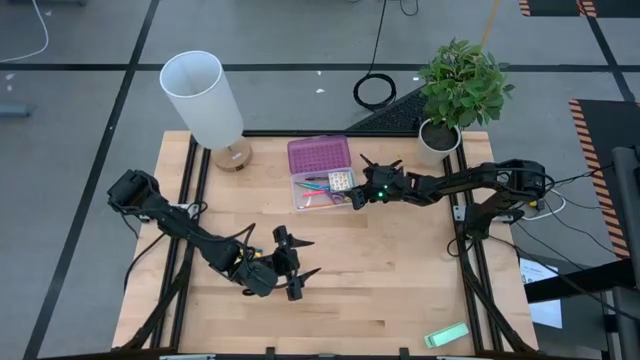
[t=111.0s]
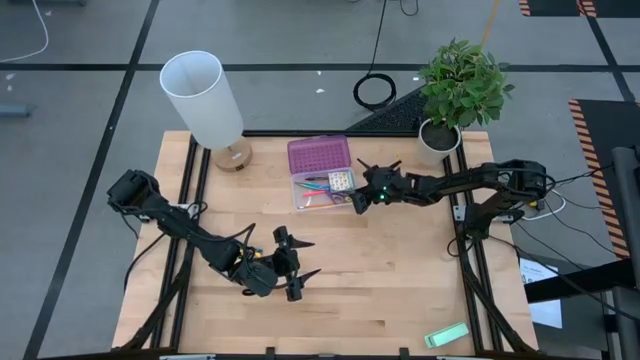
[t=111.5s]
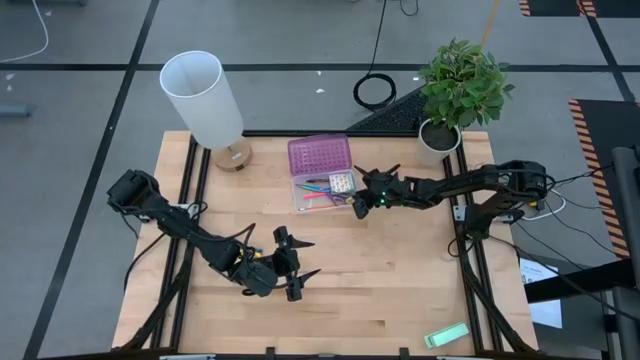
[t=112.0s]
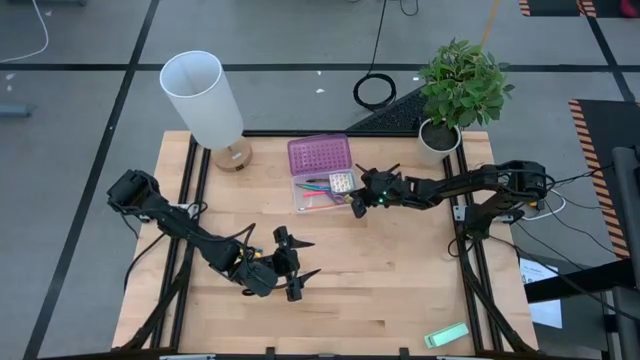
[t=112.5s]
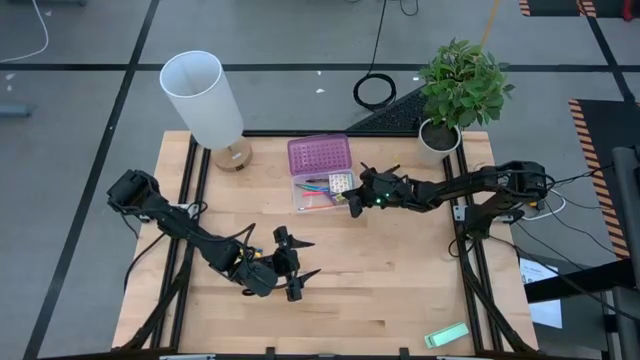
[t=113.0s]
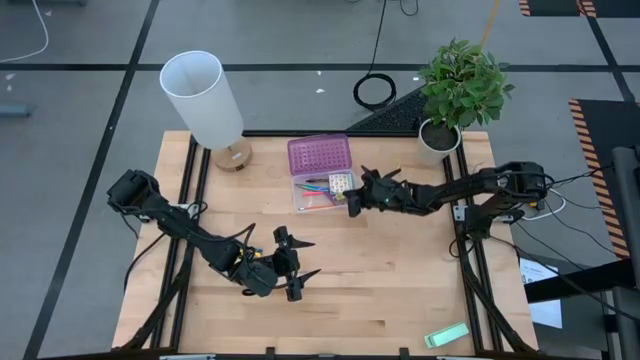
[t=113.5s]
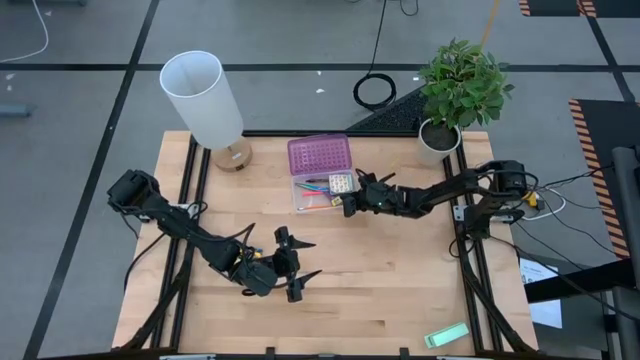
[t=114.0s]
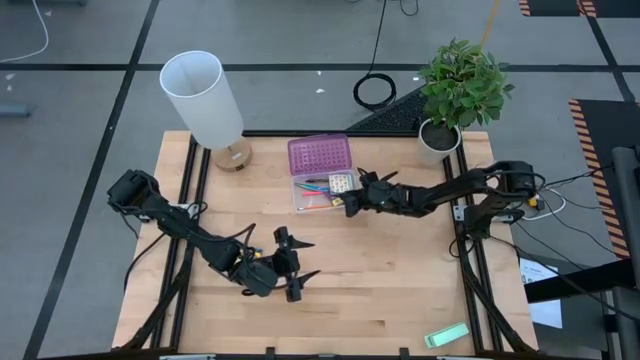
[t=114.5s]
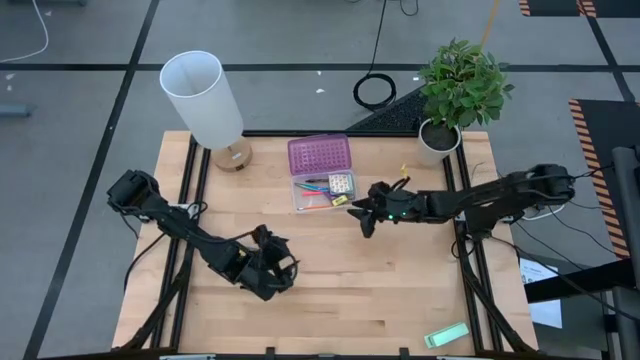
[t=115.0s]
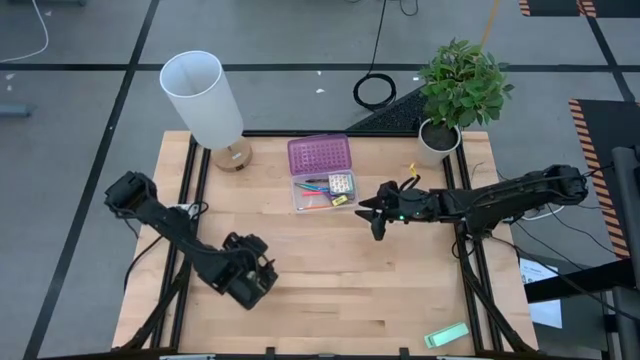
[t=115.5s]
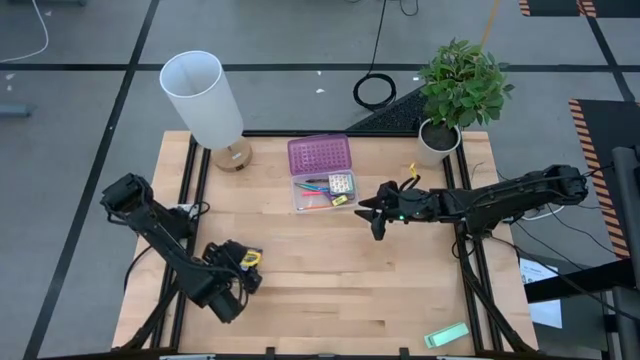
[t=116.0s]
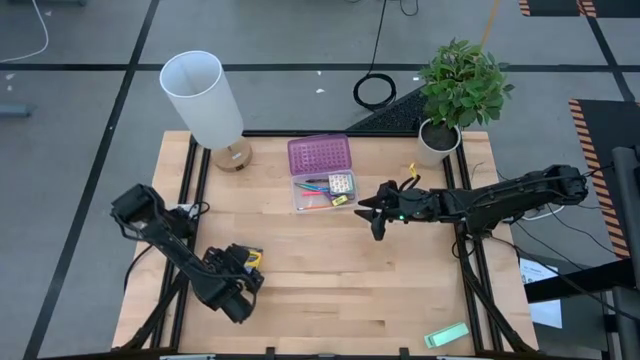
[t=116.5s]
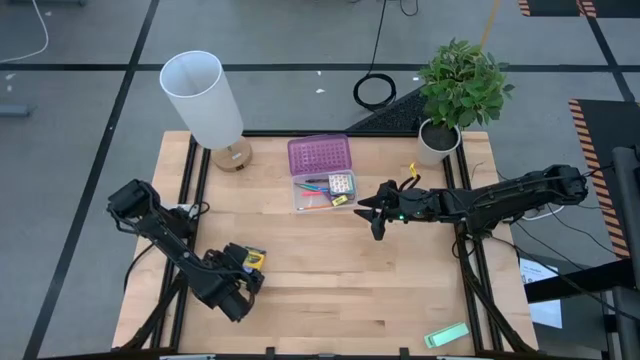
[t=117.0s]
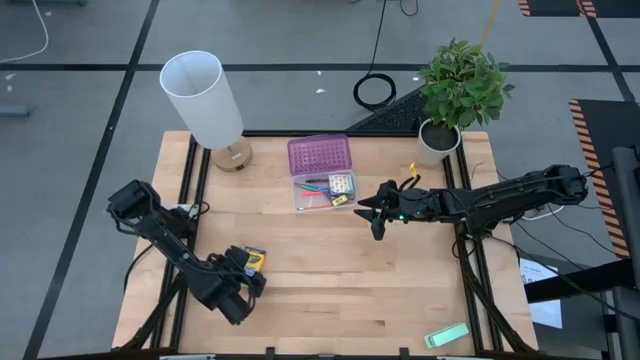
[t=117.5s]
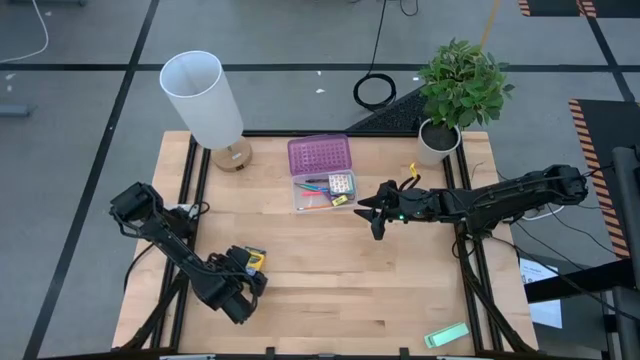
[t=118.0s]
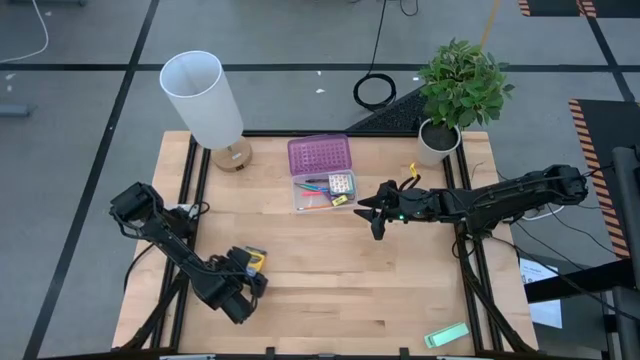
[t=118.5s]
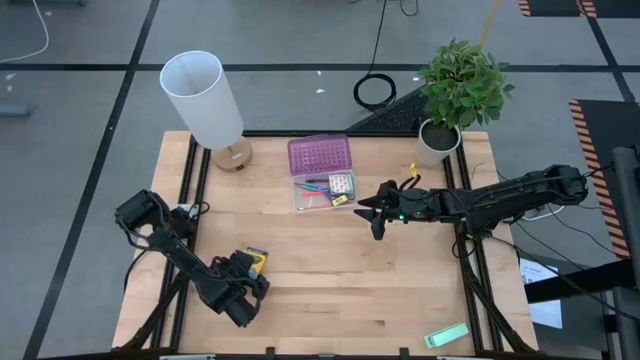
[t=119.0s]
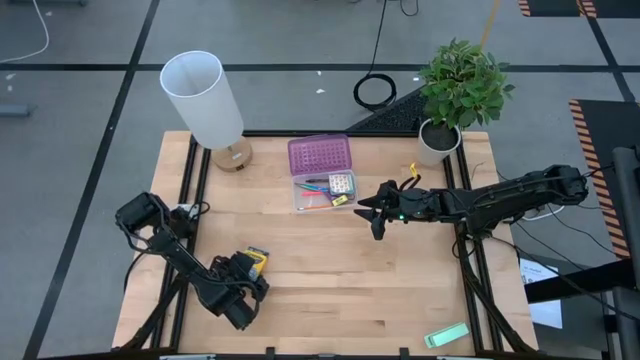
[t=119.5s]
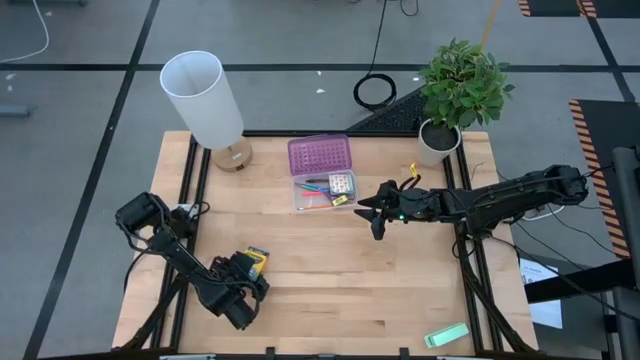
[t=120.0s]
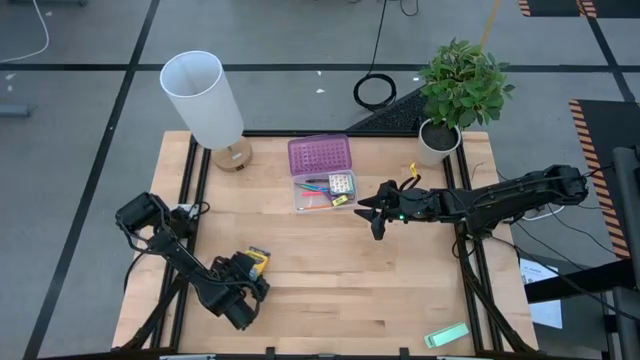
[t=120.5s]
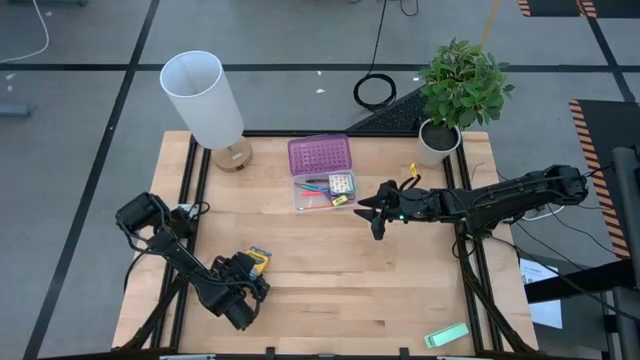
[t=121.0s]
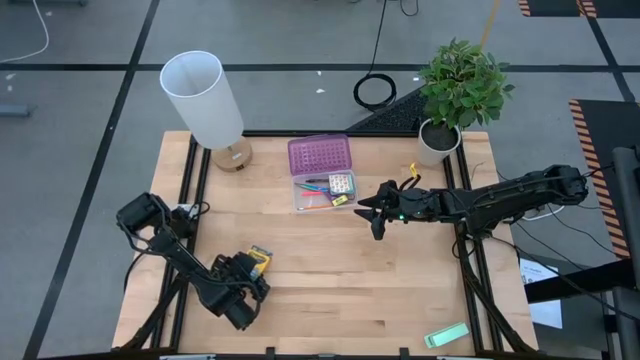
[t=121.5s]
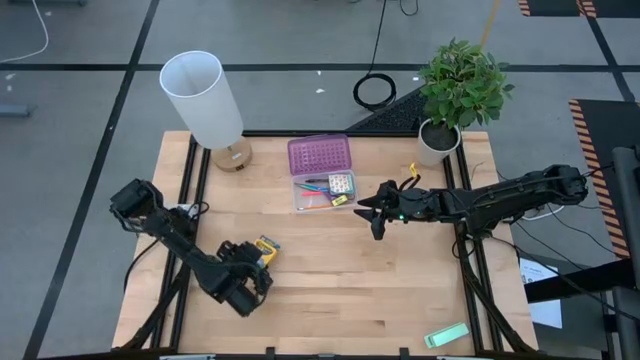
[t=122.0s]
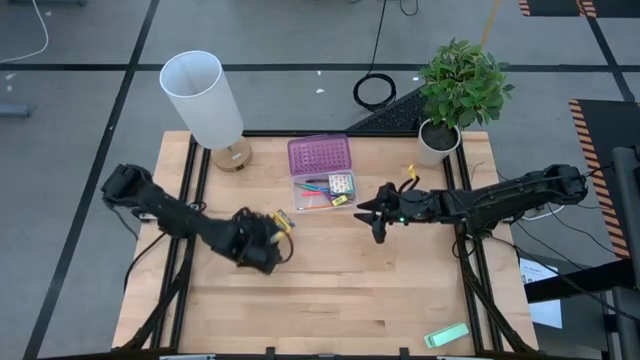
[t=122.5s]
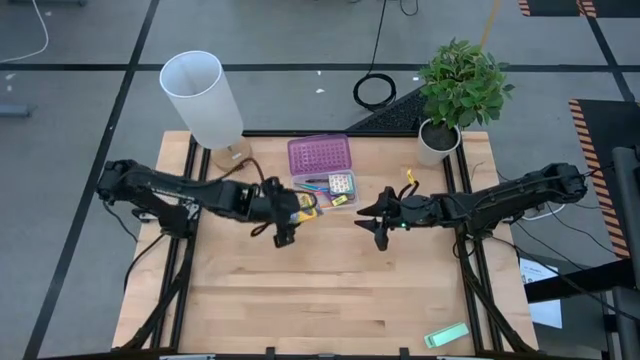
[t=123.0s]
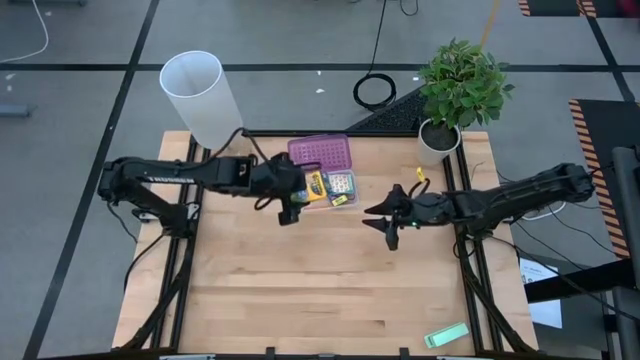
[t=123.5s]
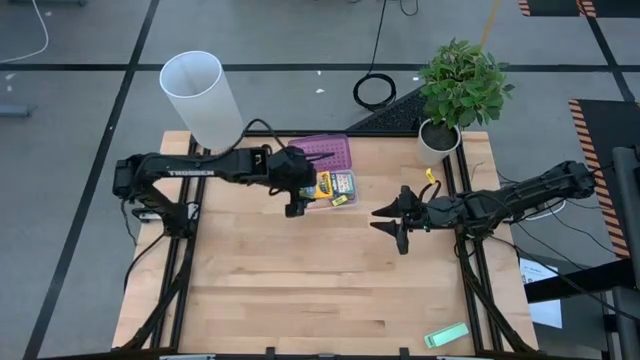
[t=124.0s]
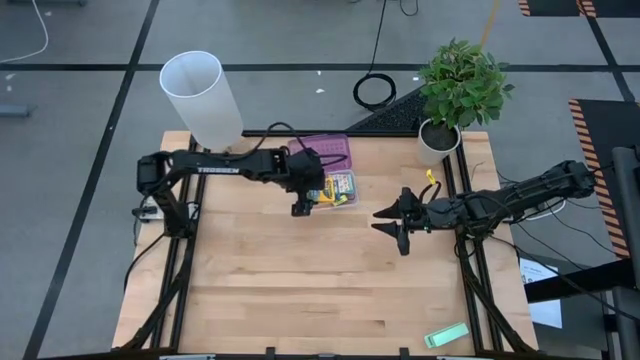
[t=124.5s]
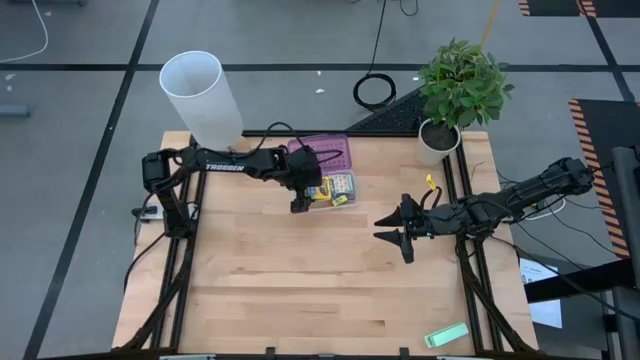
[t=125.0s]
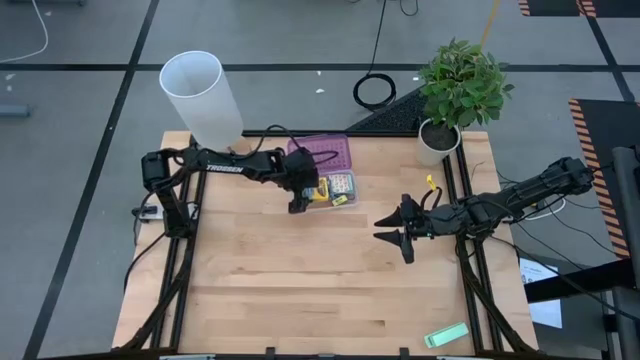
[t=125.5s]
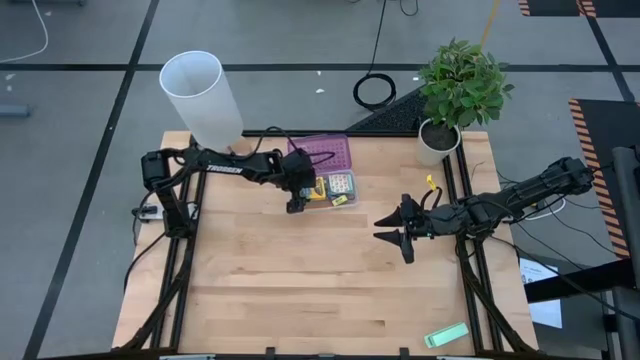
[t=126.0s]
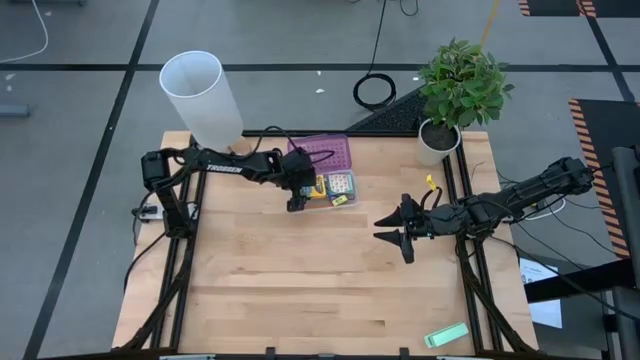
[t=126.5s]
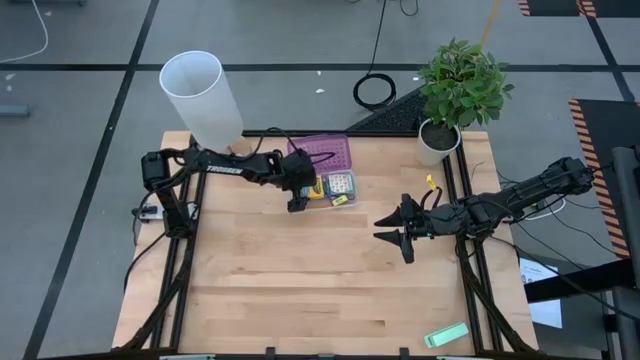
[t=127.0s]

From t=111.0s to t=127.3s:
Task: Pack school essentials
Put the yellow crayon box into the purple supply box

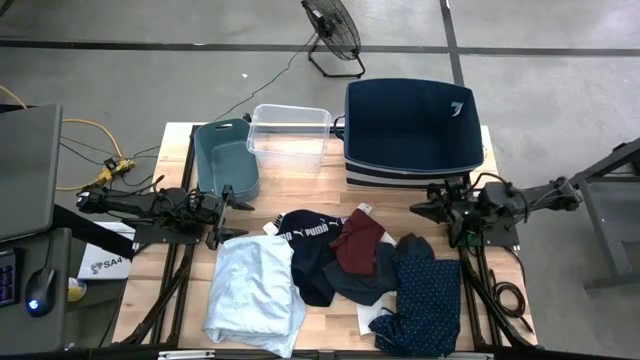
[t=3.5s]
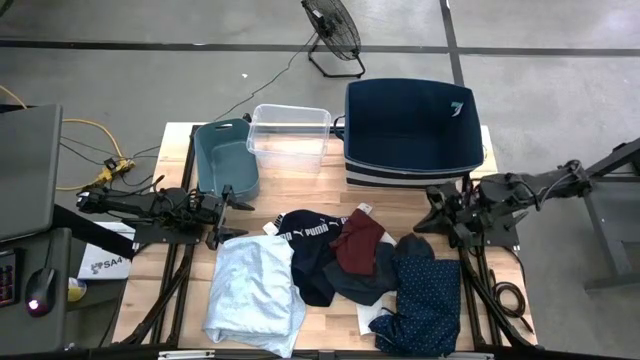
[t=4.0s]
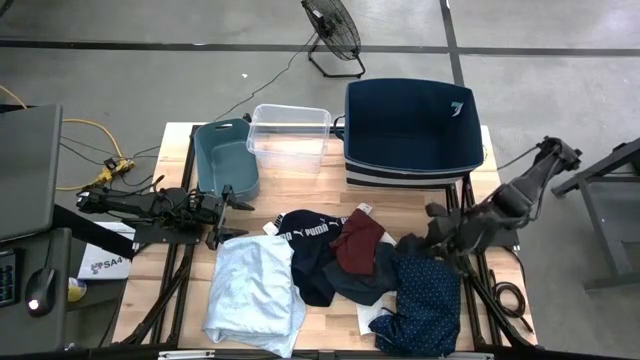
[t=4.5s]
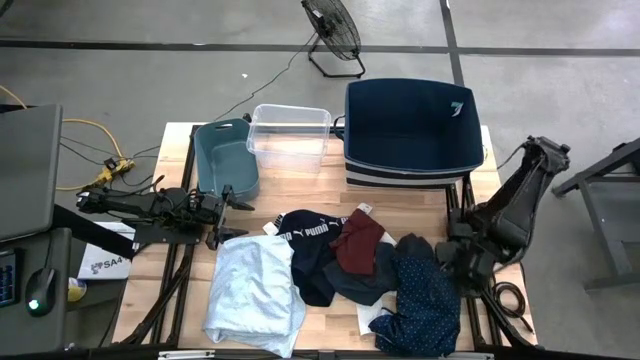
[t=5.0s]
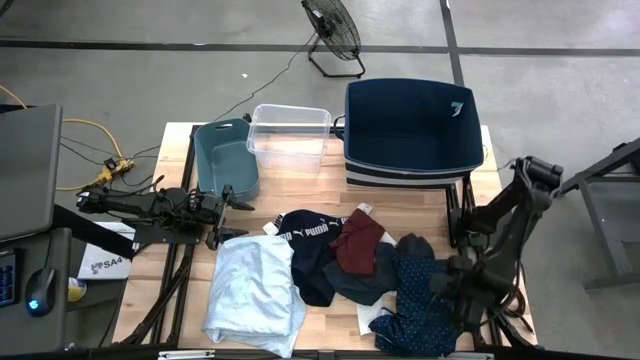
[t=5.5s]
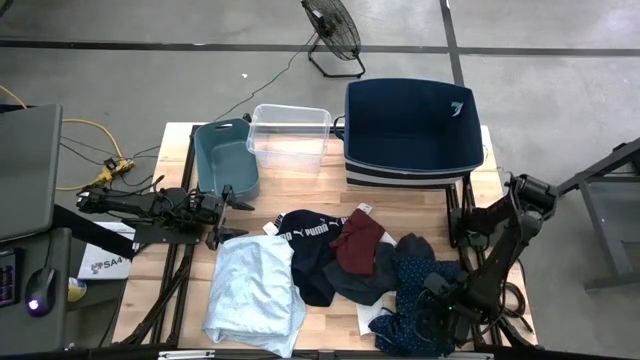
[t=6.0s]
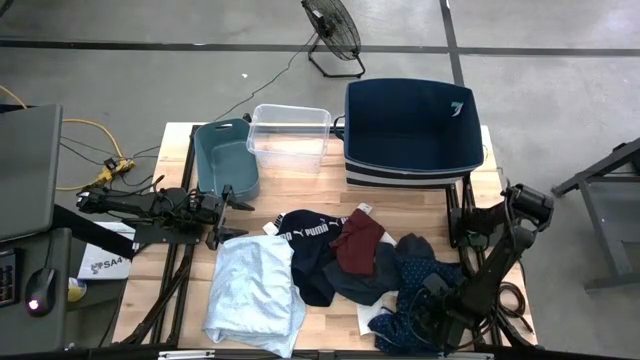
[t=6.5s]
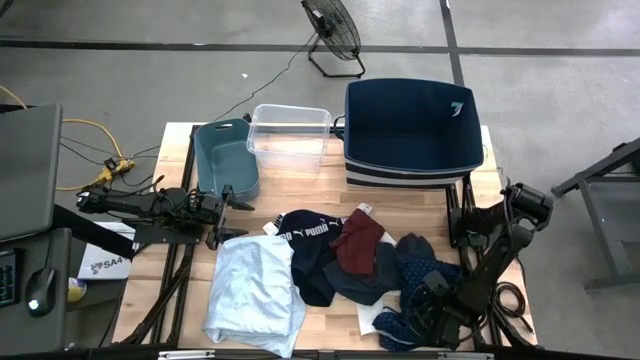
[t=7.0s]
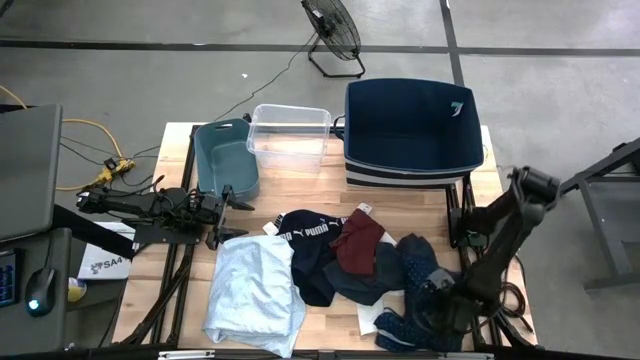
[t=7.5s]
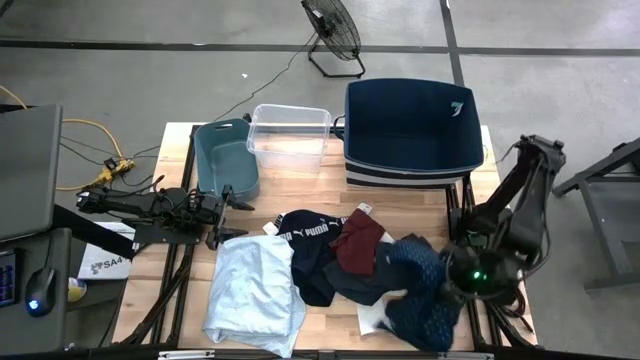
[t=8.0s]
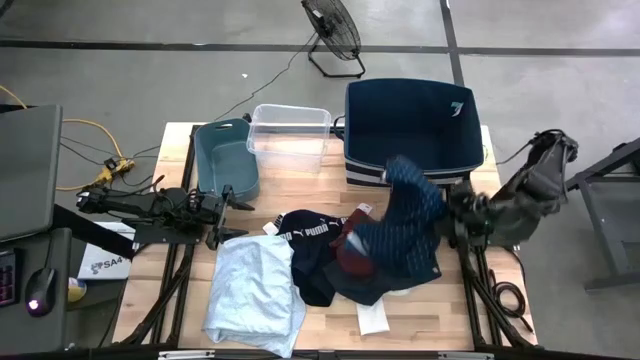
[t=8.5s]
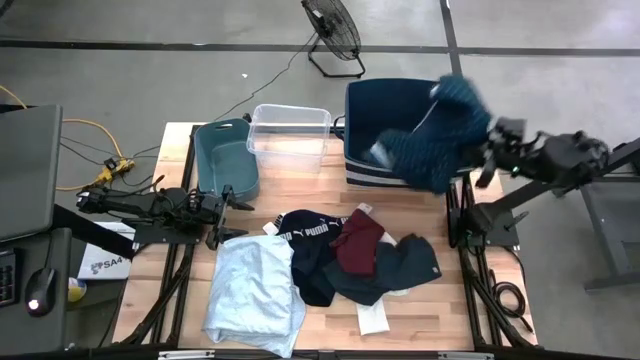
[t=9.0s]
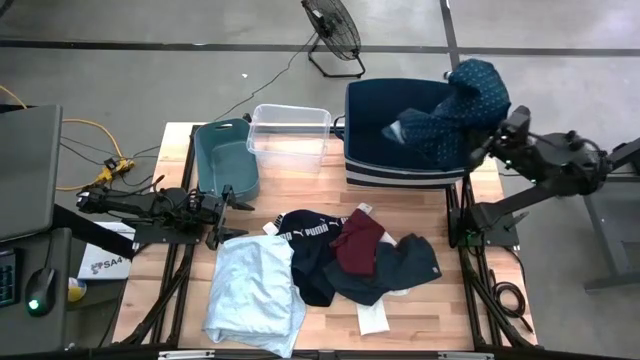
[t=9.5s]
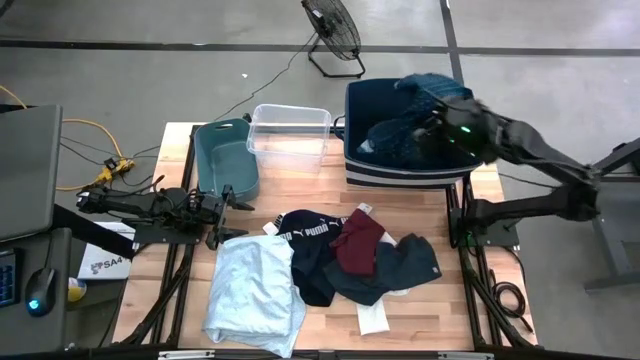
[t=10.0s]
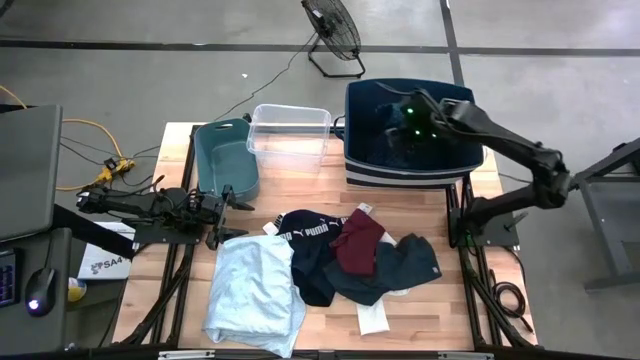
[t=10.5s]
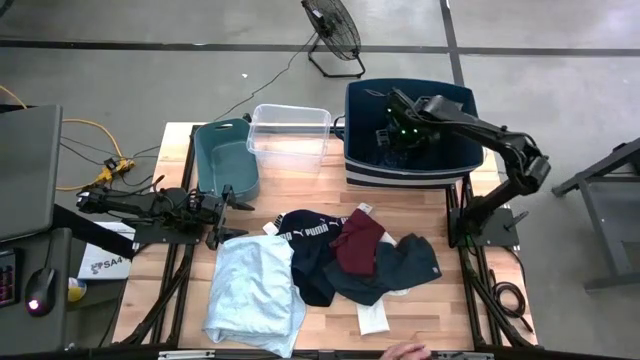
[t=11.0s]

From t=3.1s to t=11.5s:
Task: Pick & Place Cloths
Put the blue polo shirt into the blue laundry organizer
